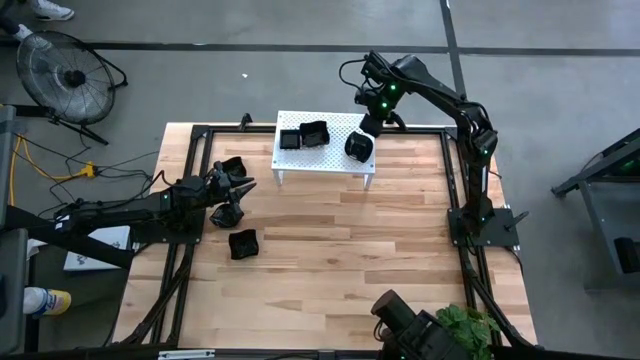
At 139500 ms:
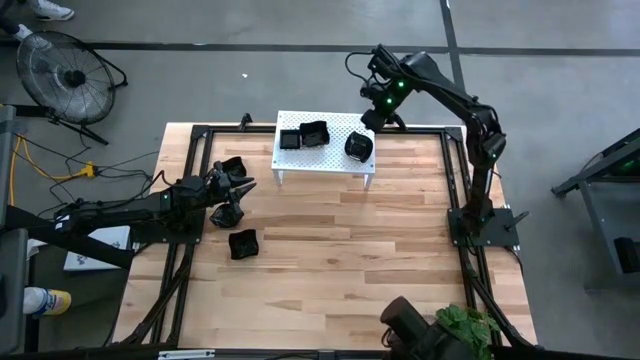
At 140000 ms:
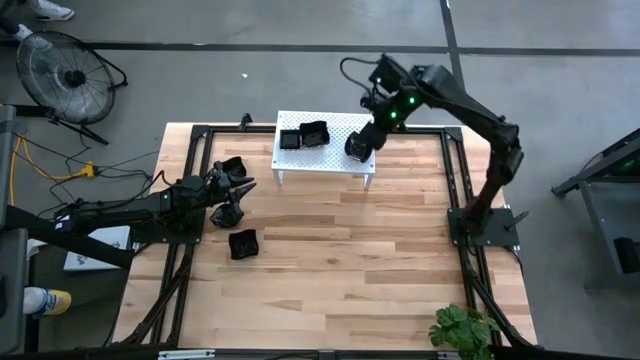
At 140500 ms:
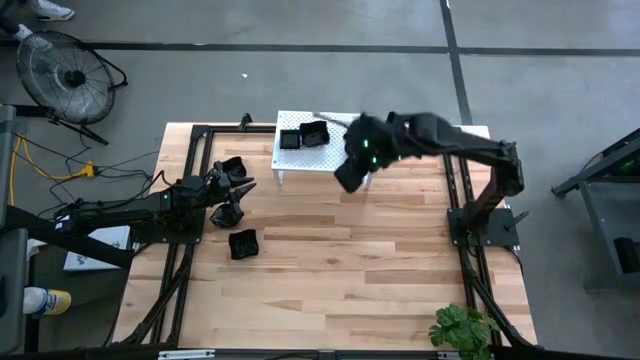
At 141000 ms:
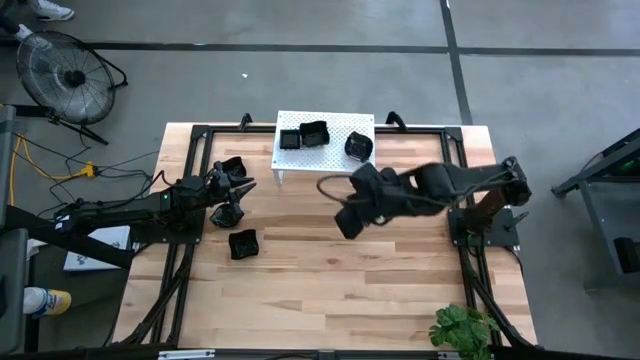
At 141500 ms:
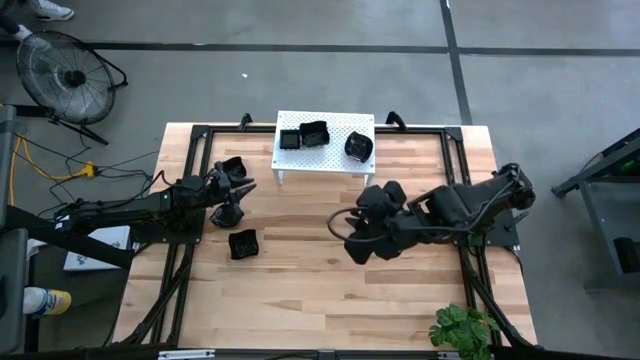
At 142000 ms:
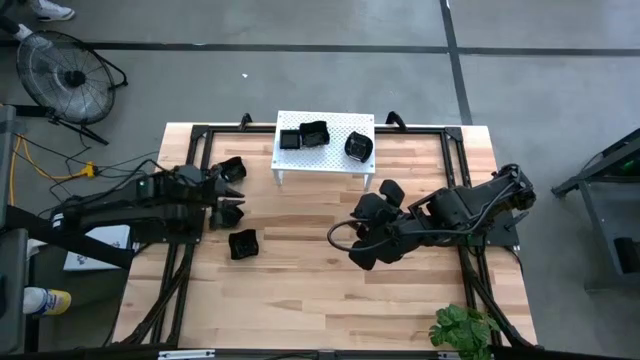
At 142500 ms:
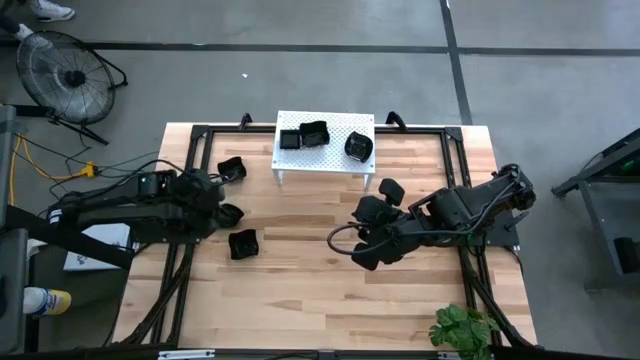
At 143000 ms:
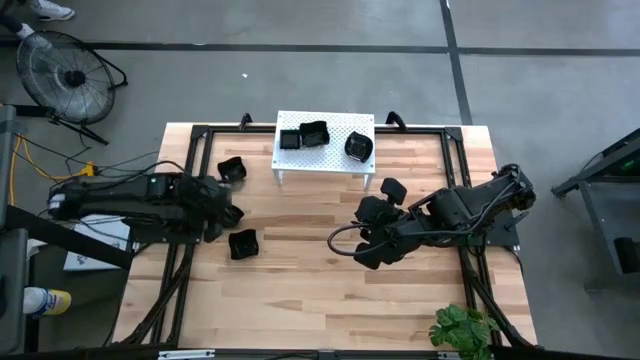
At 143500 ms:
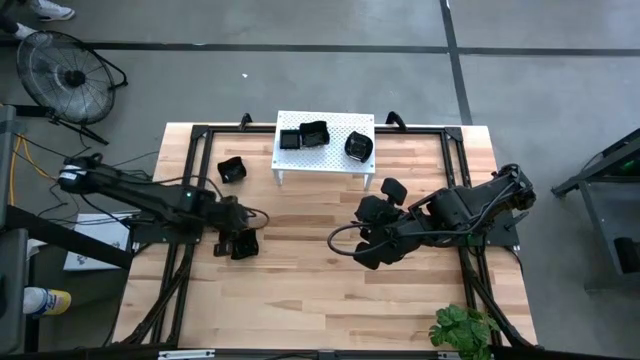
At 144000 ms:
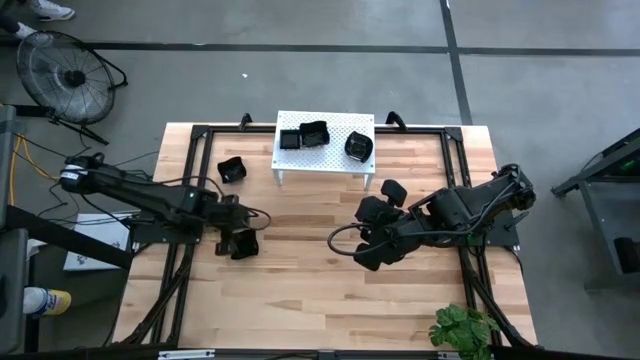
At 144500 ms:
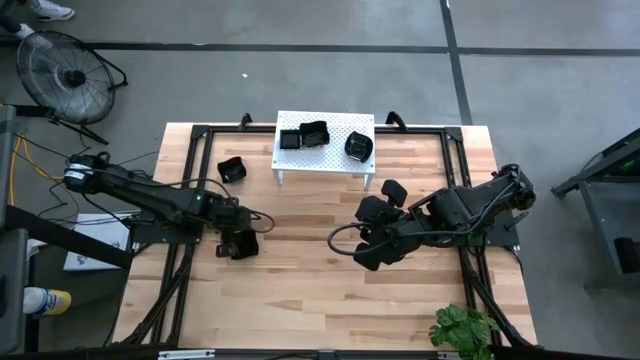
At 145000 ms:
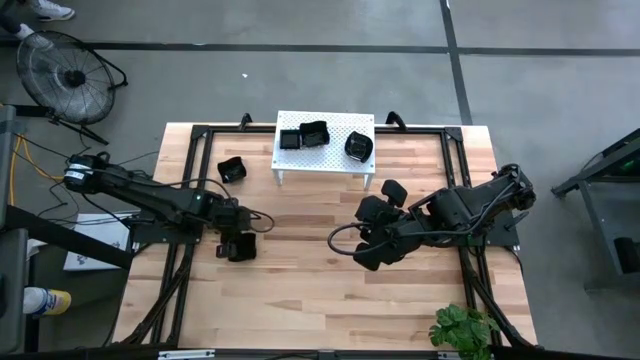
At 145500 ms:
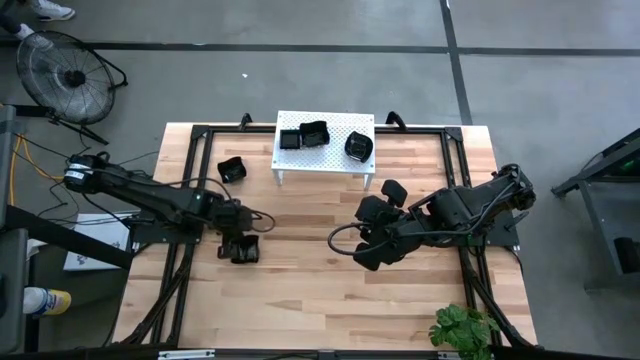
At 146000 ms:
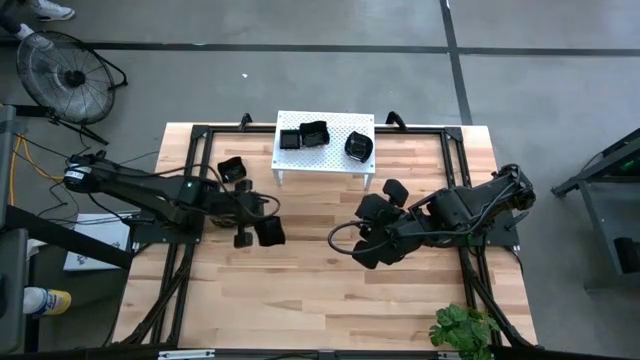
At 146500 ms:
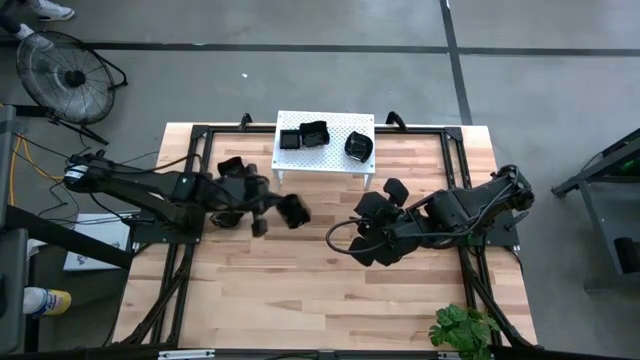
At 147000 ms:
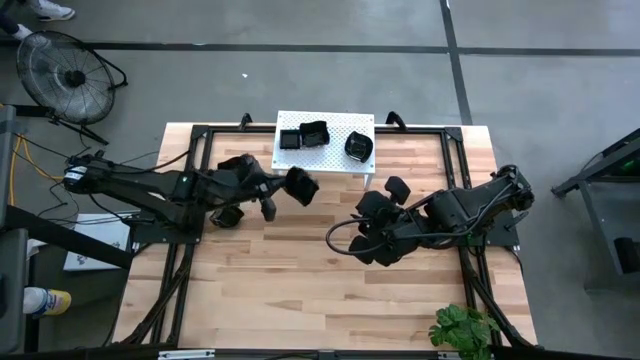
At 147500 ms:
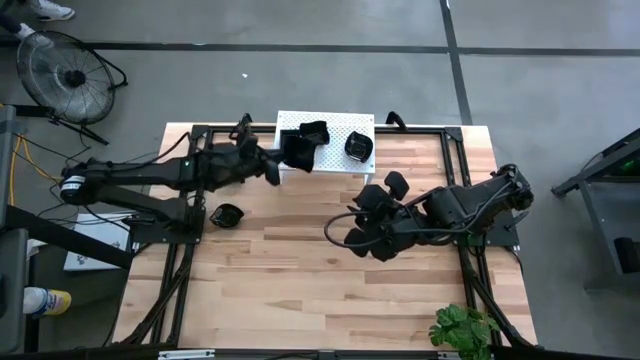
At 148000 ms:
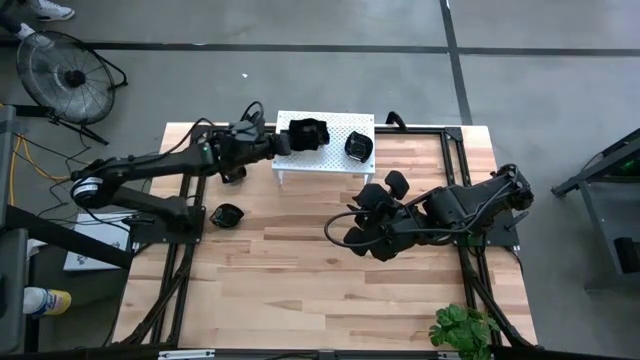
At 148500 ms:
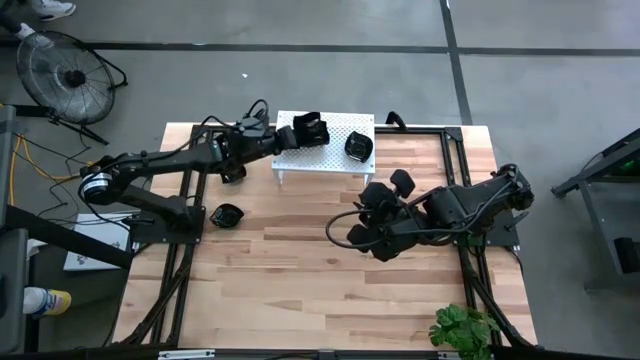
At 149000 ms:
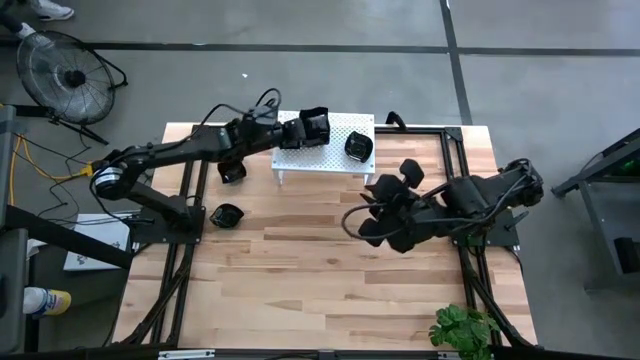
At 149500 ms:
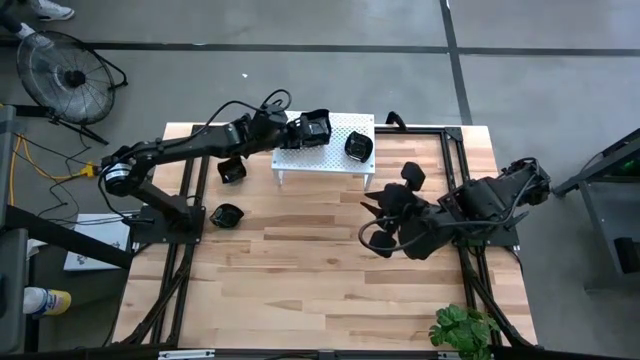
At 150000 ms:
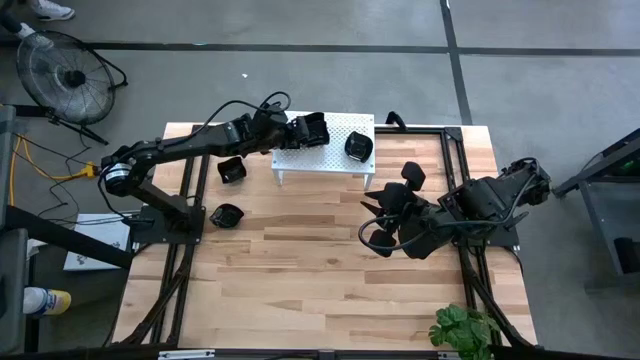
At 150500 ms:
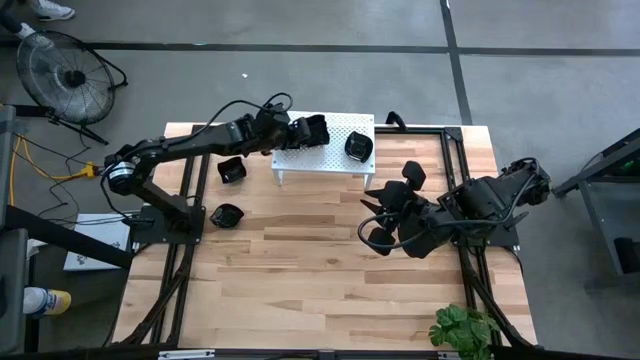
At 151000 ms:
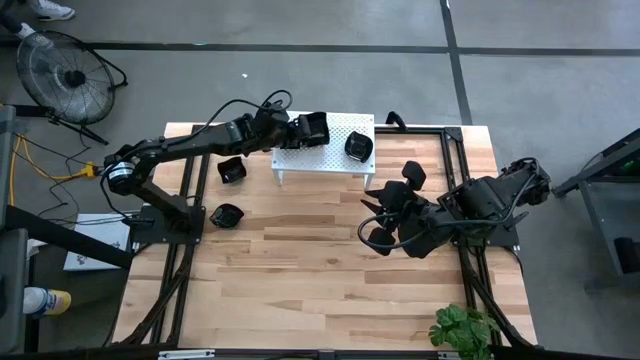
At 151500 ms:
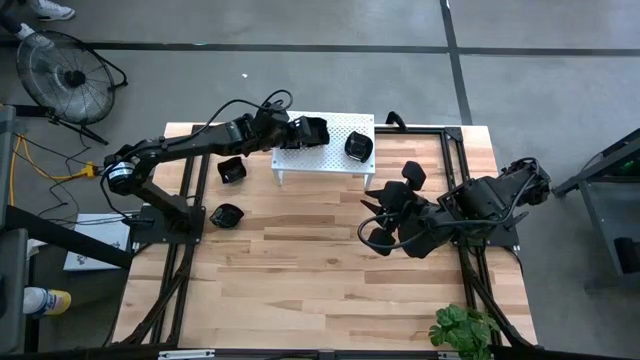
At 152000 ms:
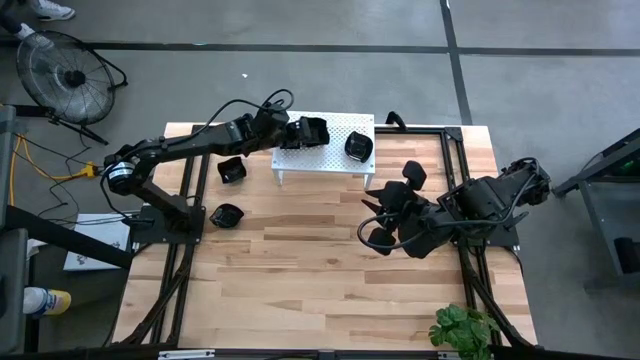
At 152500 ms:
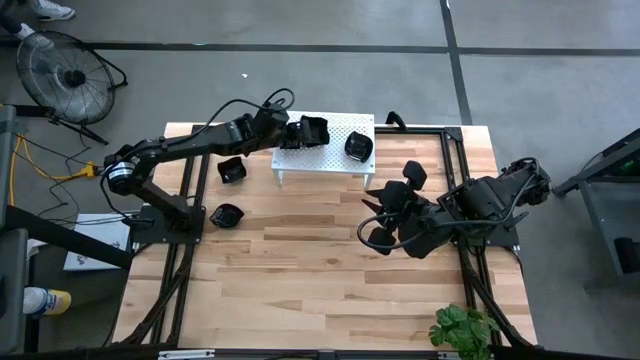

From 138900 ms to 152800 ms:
Task: Pick & Place Mini shaped plates
Stack the distorted square plate on top of the other distorted square plates on the shelf

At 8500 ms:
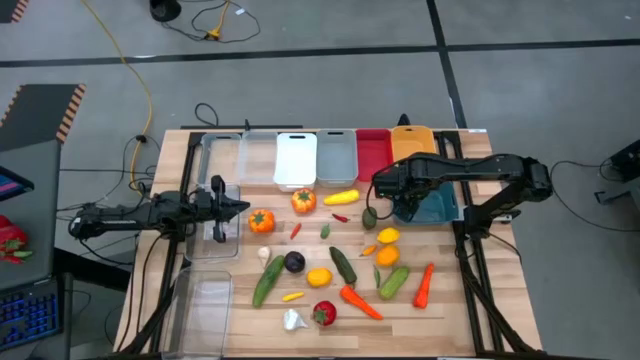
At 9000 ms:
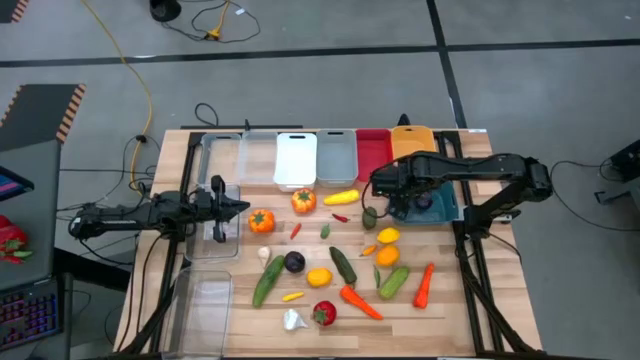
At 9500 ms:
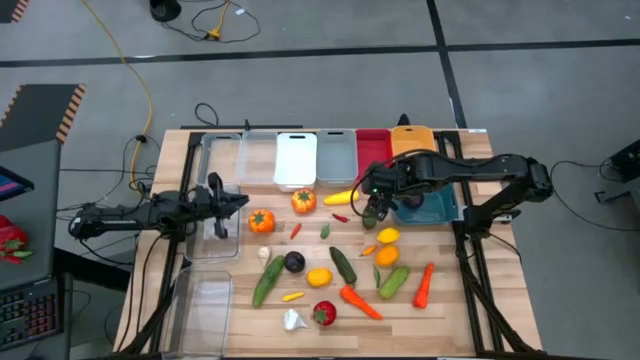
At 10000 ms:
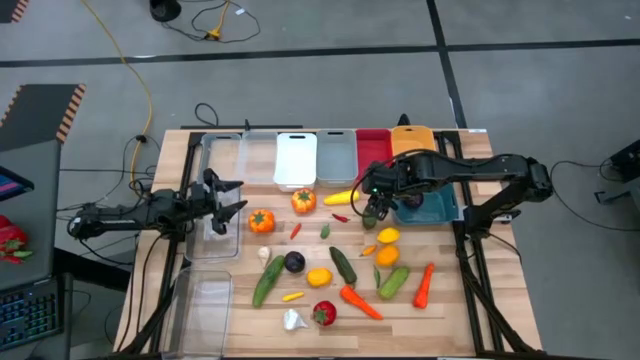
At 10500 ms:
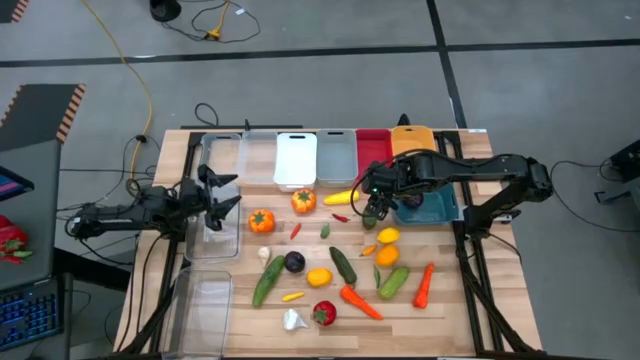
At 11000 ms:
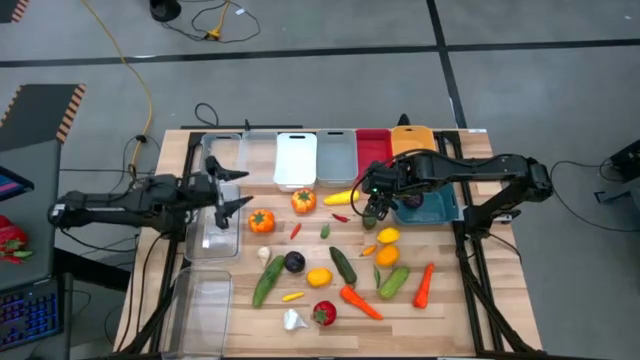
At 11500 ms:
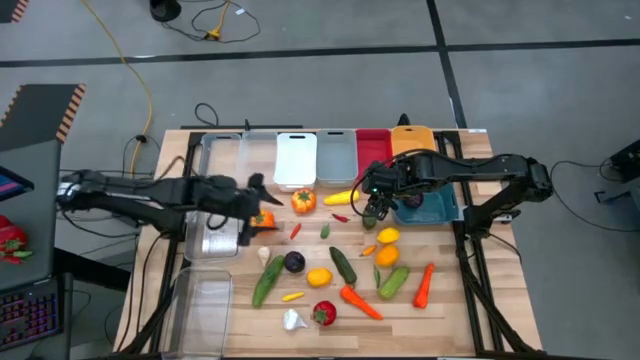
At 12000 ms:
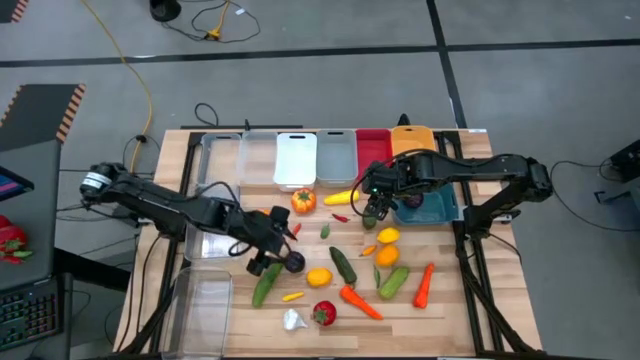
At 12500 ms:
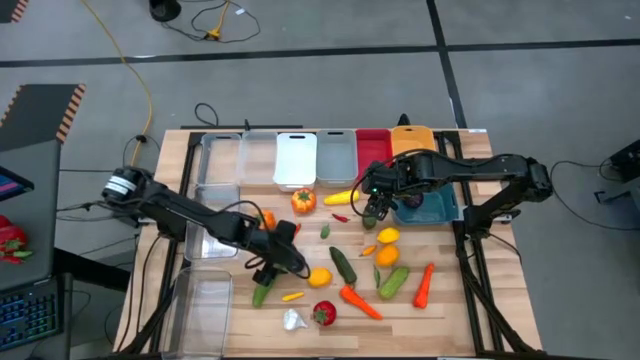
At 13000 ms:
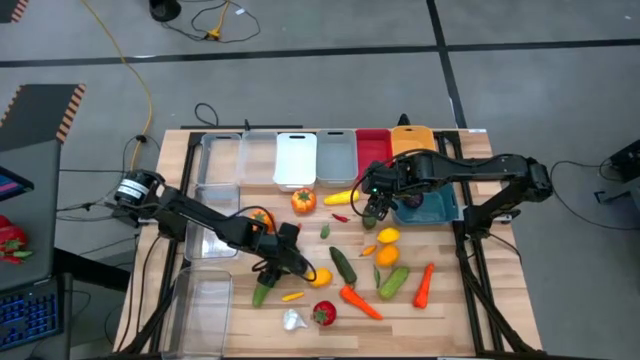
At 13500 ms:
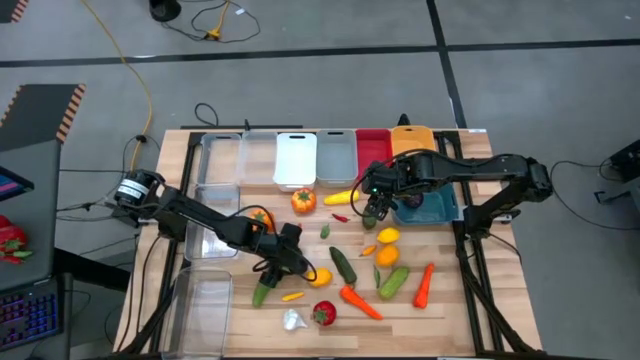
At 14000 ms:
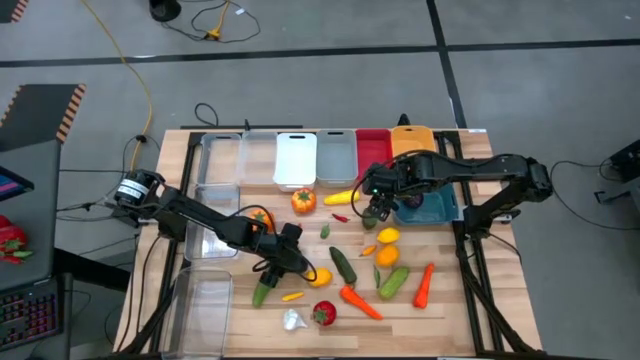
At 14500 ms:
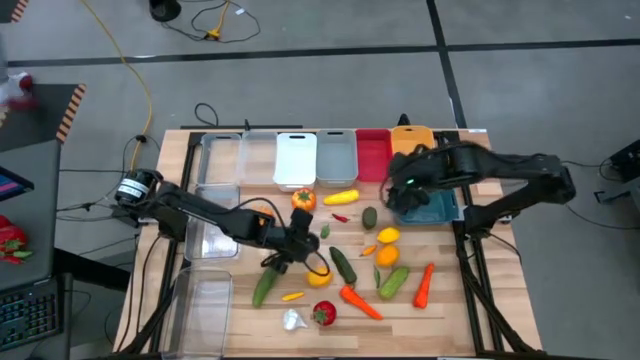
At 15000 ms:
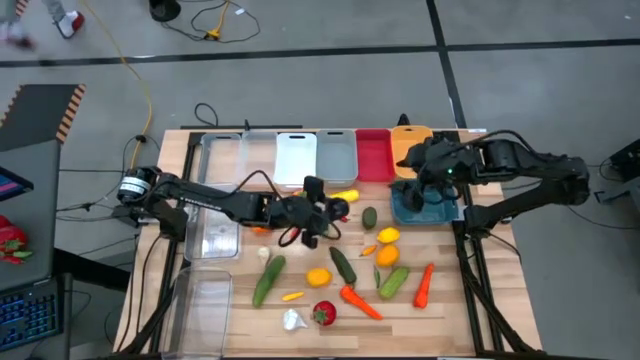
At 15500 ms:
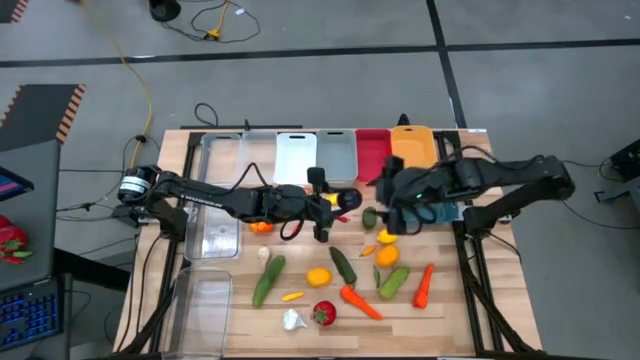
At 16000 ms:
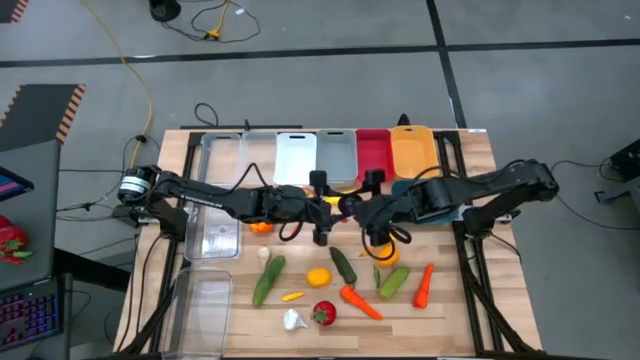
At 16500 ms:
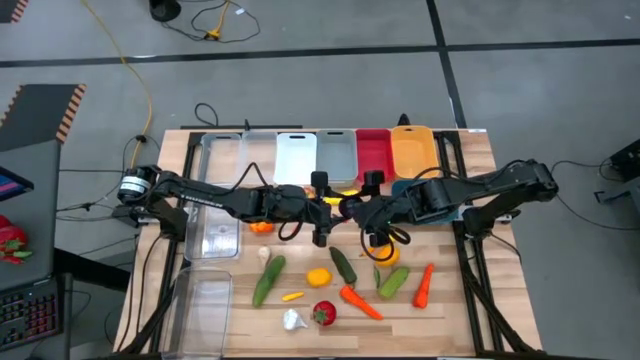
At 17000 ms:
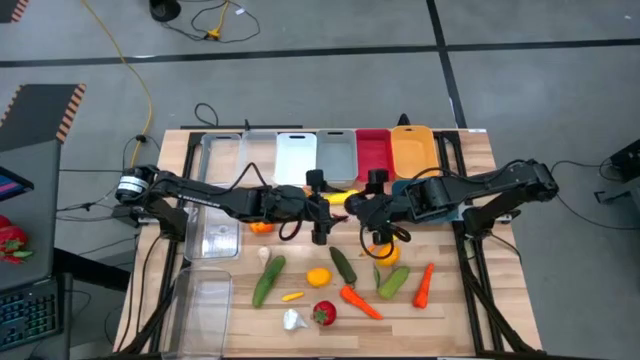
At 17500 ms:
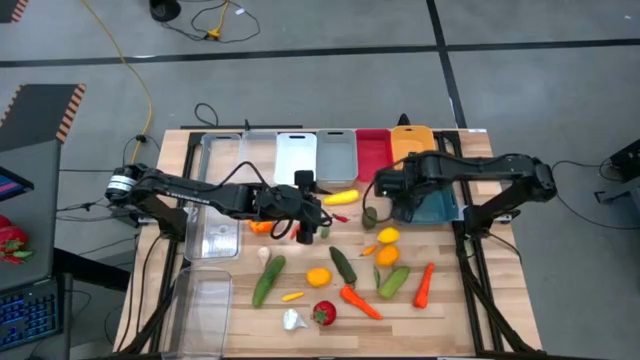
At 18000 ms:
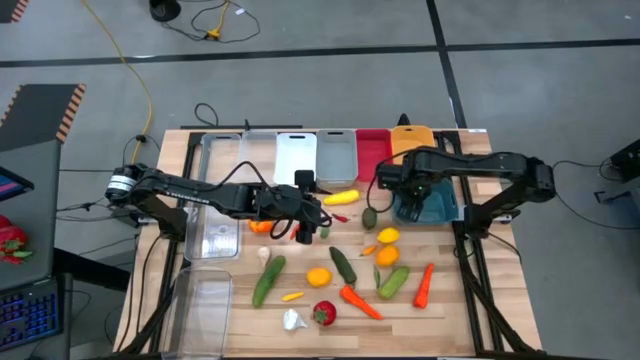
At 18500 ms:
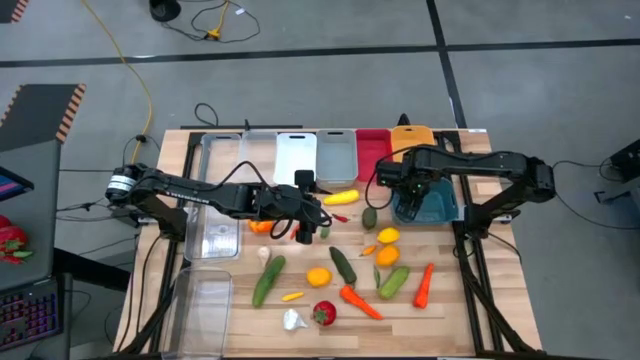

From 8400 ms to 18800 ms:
Task: Sort produce into baskets
Put the plum into the blue bin
